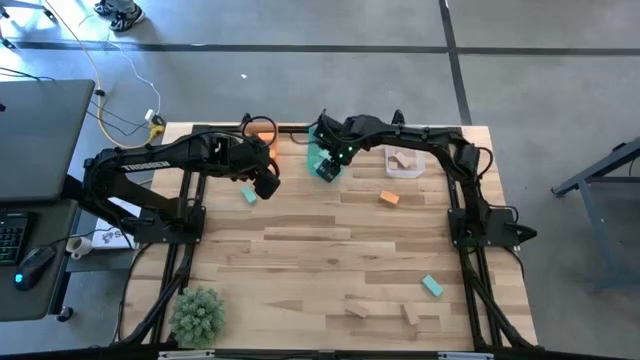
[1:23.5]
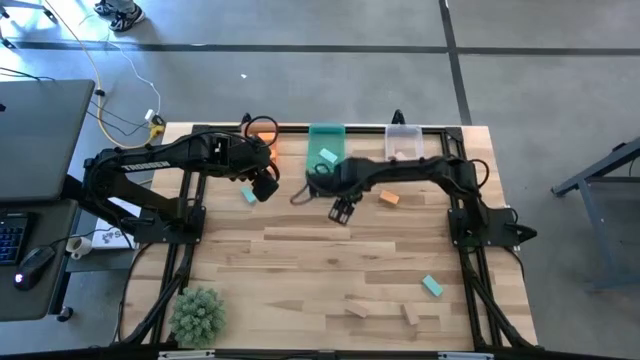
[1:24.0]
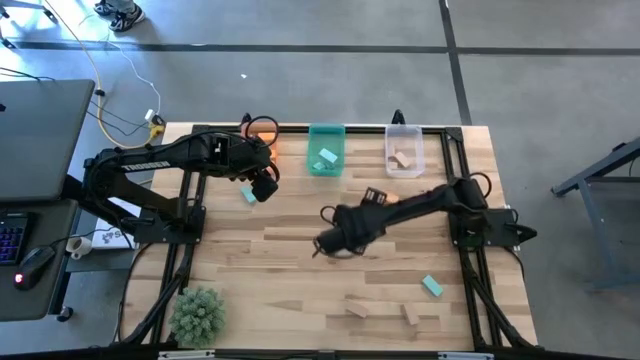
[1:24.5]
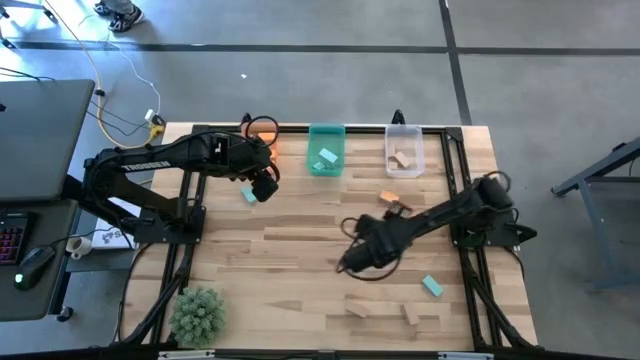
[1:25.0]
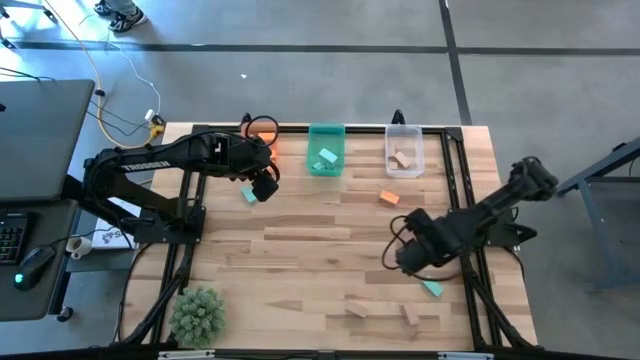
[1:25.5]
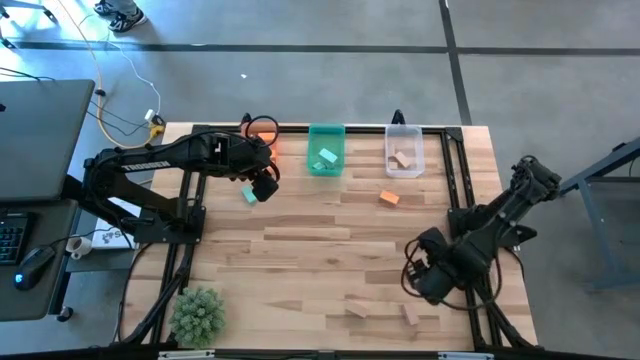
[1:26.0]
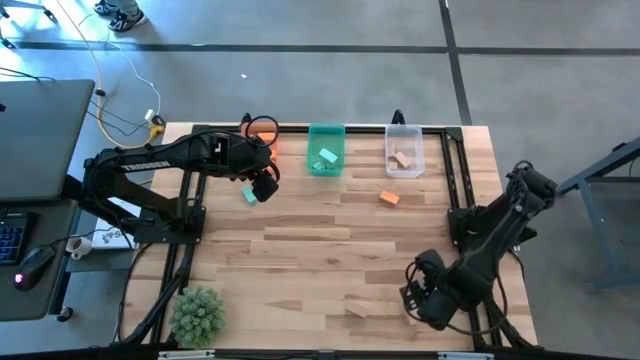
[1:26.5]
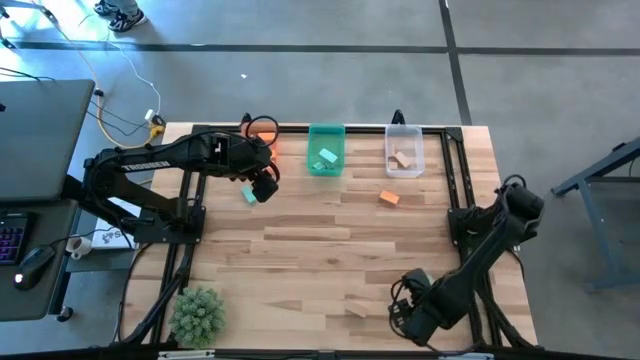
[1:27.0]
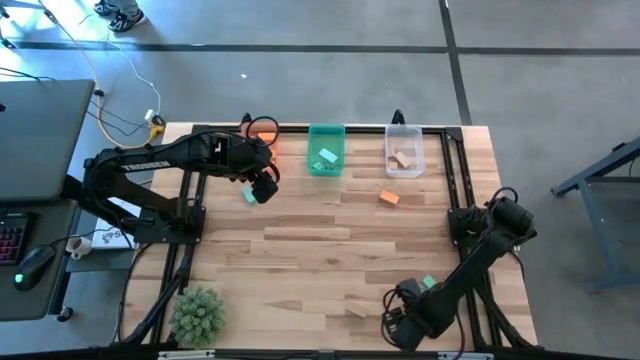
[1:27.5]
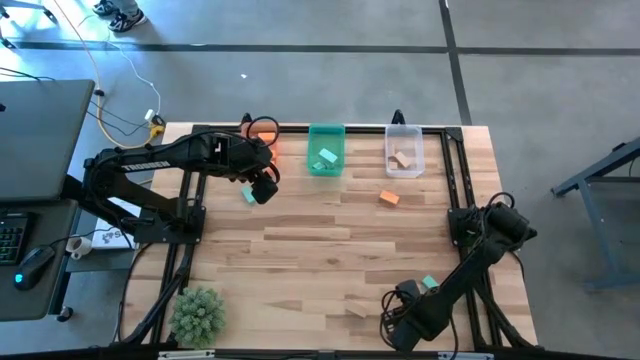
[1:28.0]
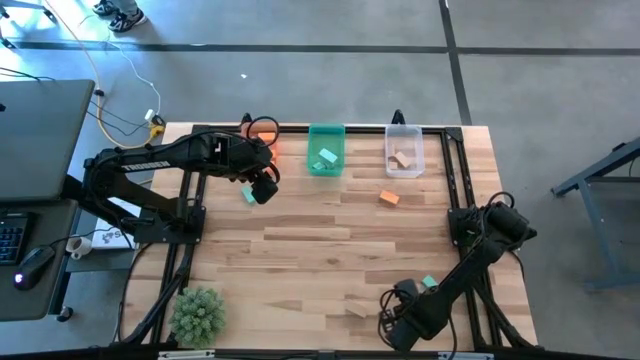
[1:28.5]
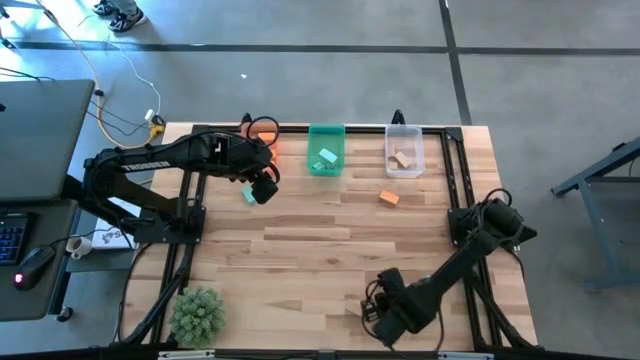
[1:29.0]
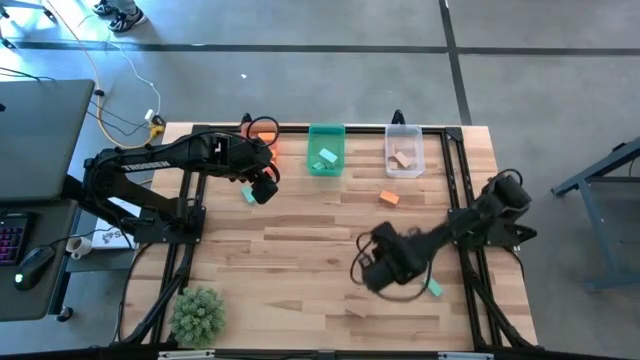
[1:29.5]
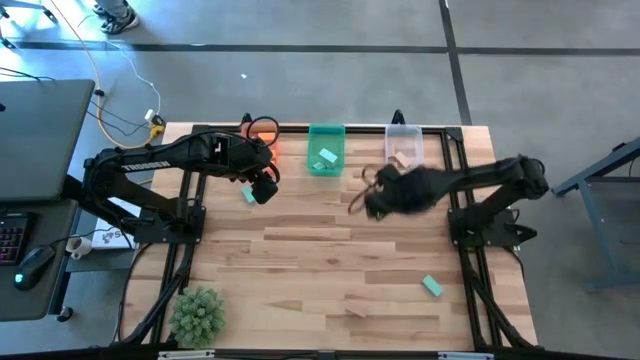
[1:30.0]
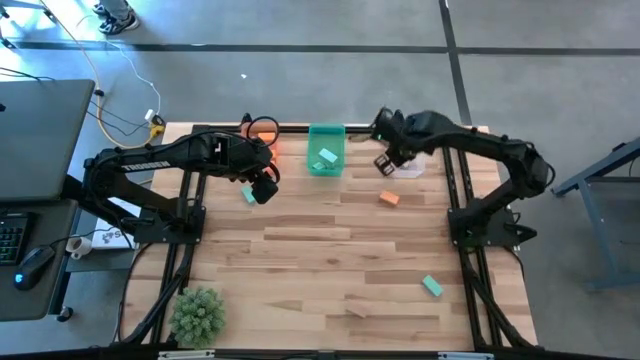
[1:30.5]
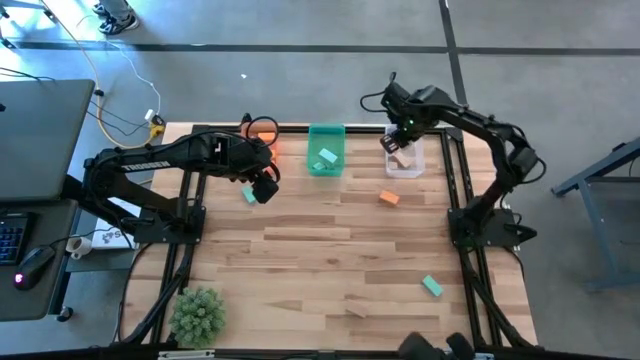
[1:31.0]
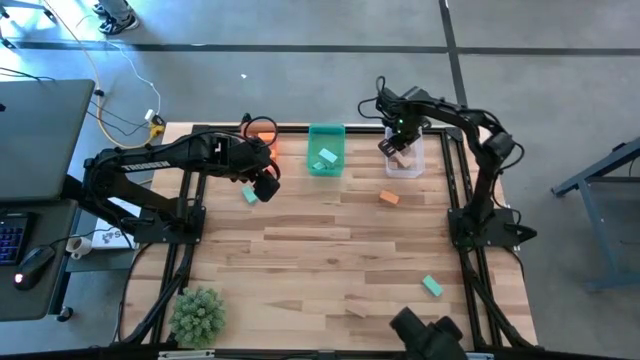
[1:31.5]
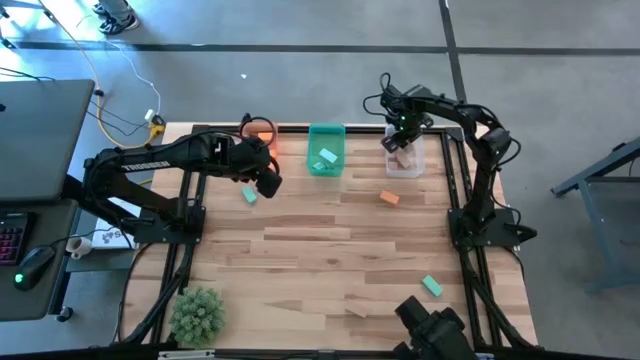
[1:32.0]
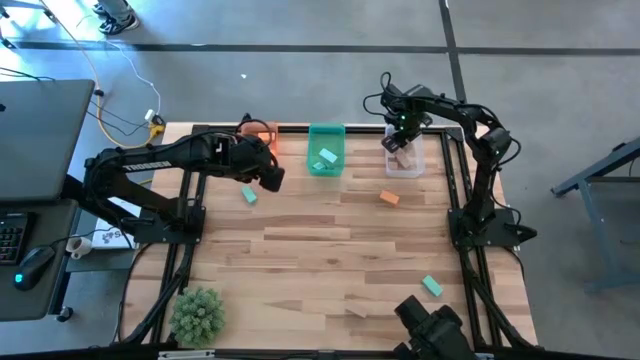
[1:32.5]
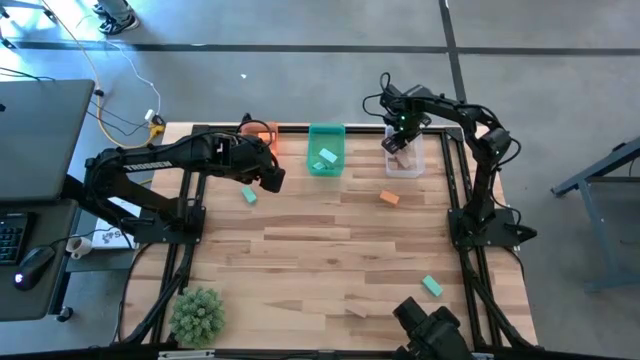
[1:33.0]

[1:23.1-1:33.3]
Task: Sort & place blocks by color
Put the brown block into the white bin

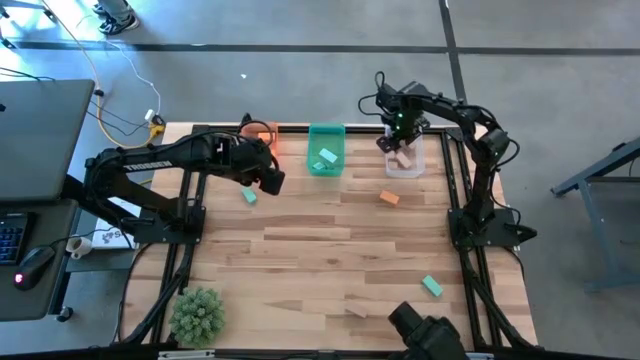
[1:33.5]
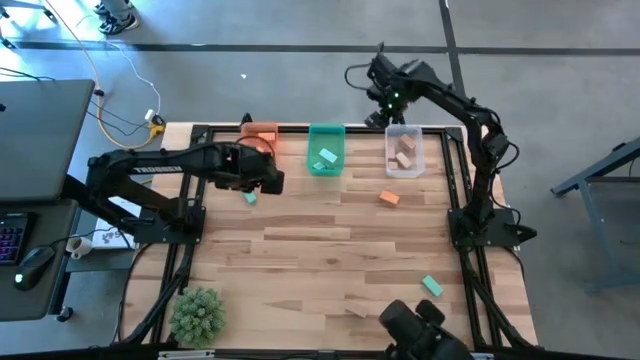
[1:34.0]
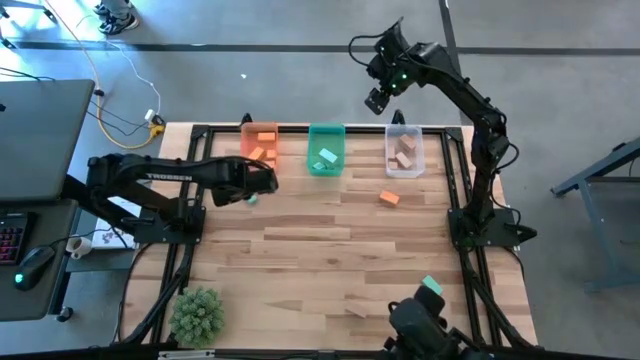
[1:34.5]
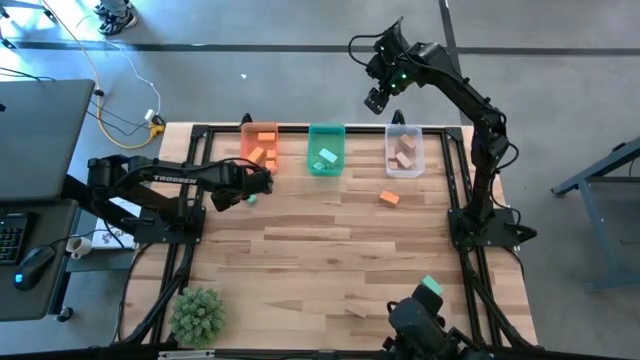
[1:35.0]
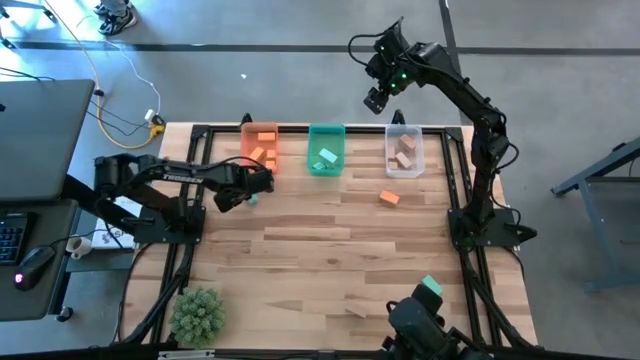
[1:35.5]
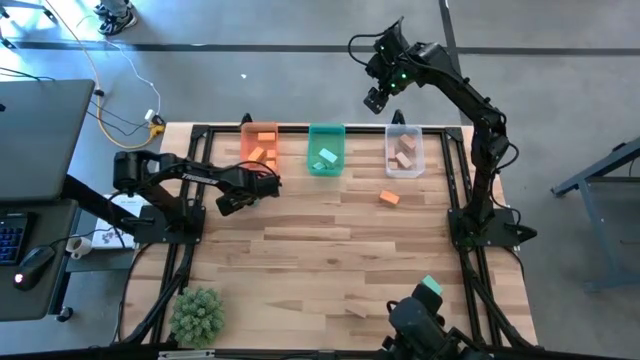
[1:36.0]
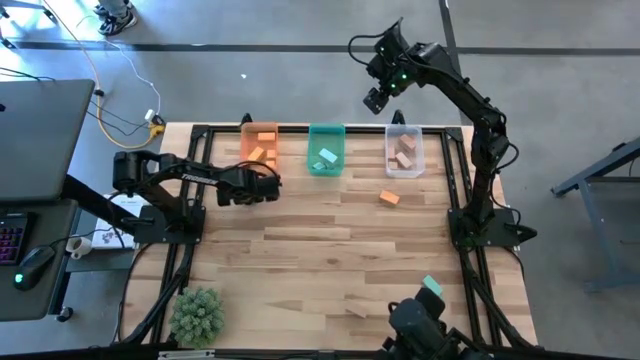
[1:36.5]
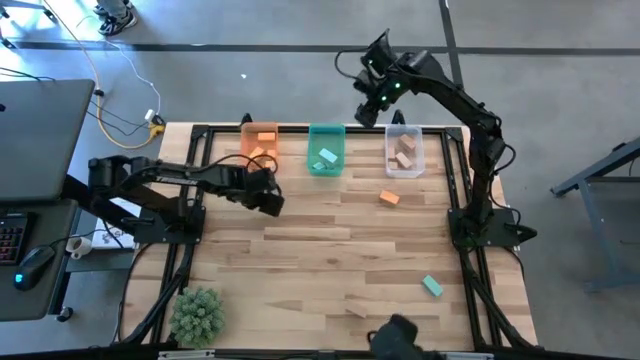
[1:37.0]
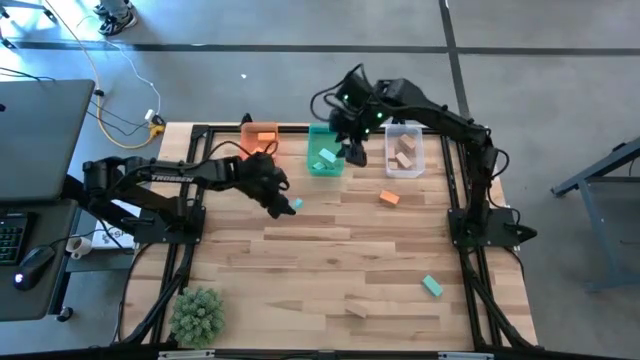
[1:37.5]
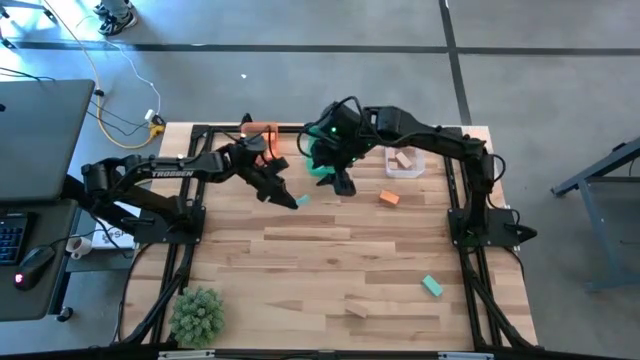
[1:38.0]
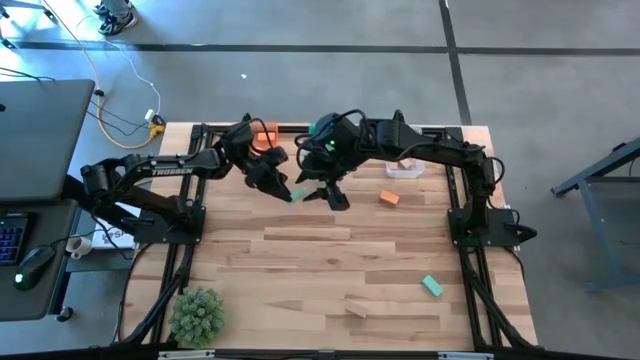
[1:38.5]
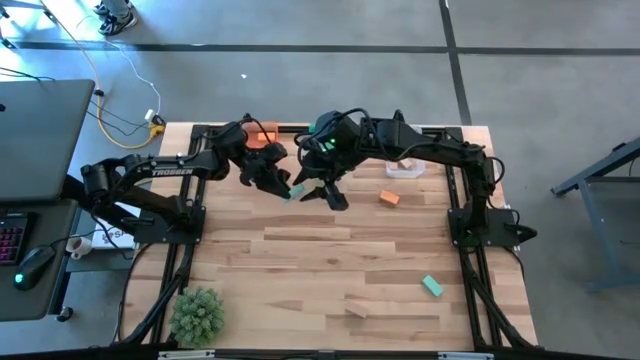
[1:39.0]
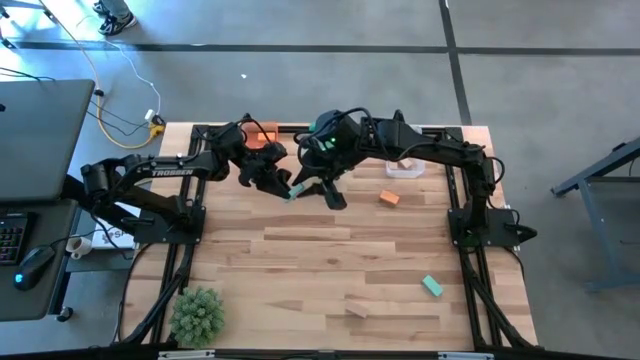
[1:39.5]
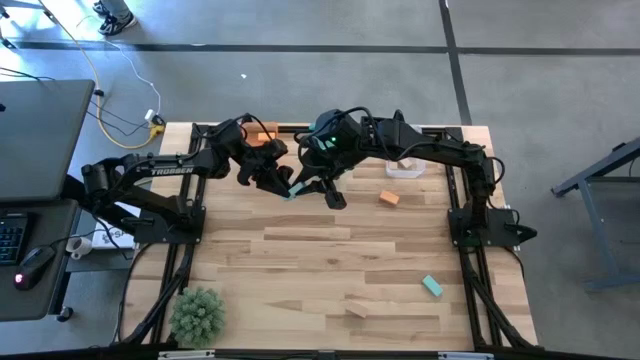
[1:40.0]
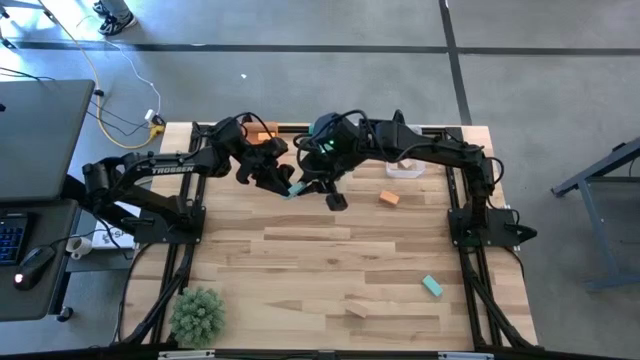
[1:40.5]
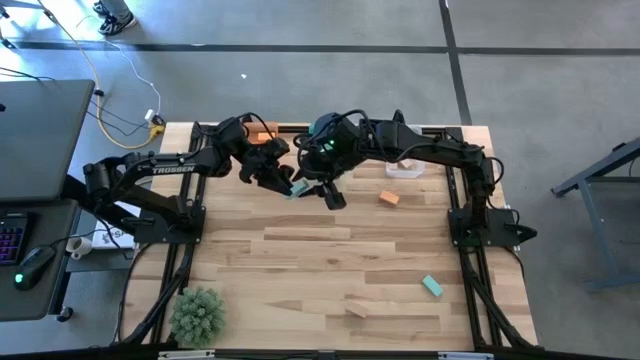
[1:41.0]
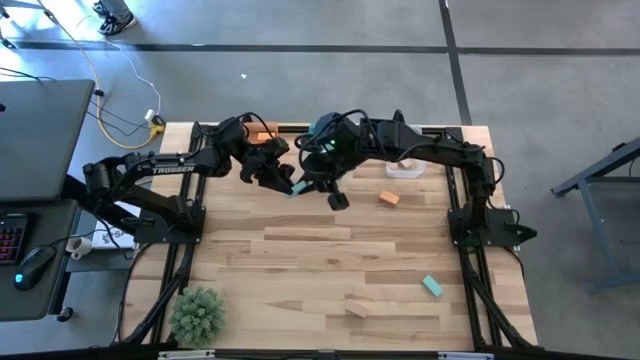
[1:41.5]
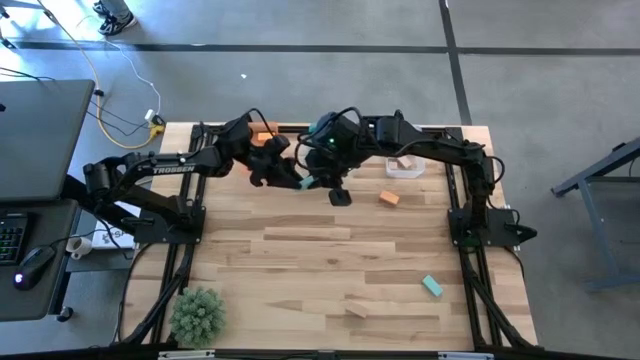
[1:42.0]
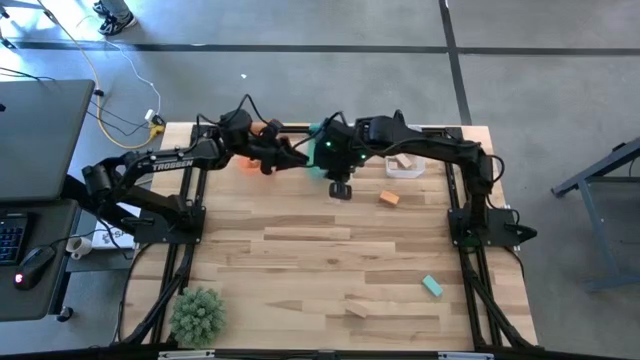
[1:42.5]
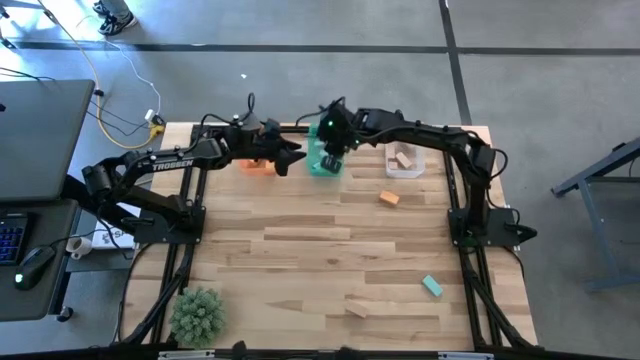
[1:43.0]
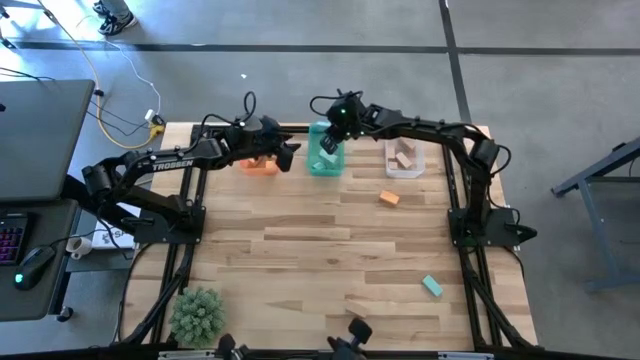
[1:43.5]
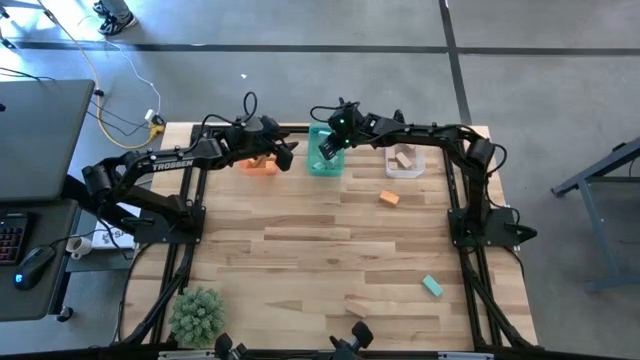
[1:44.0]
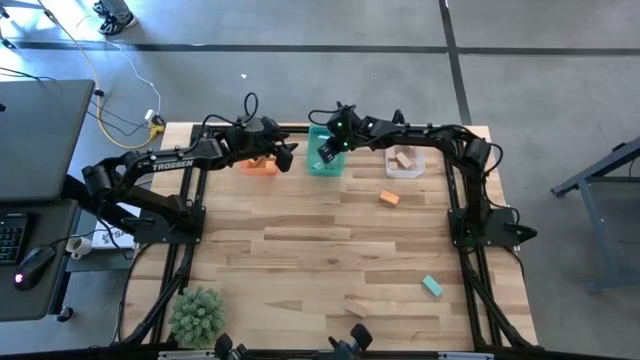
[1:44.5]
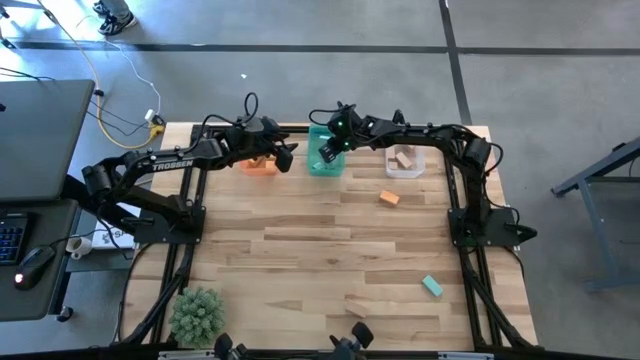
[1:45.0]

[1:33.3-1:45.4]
Put the blue block into the green bin
